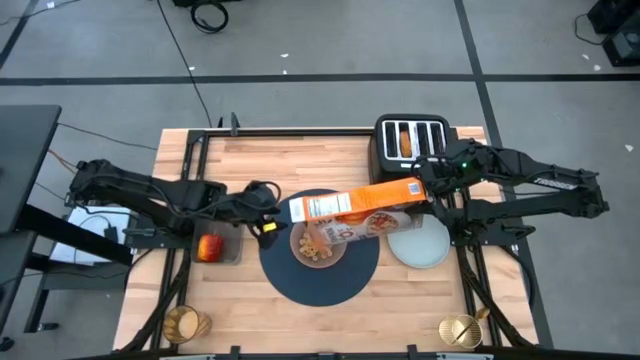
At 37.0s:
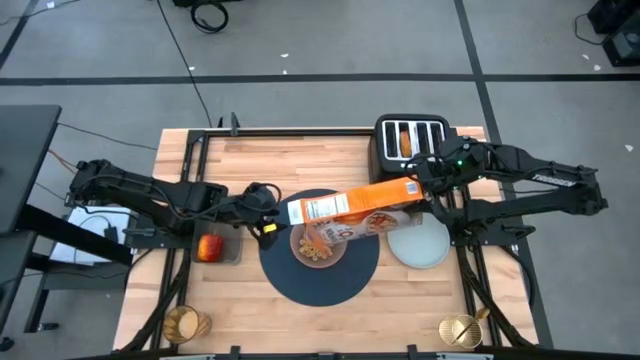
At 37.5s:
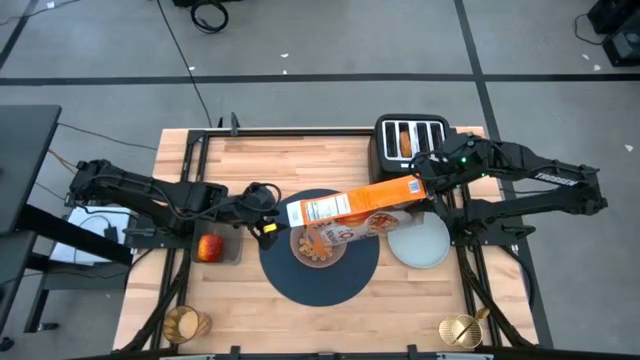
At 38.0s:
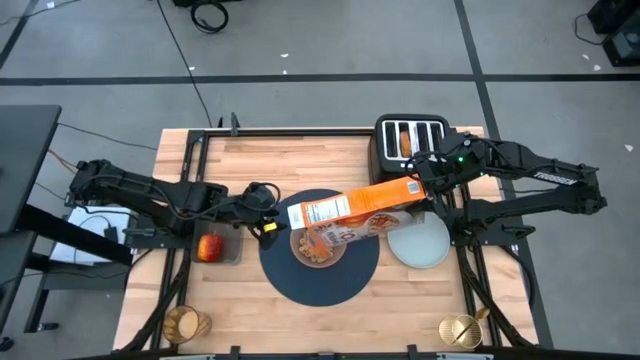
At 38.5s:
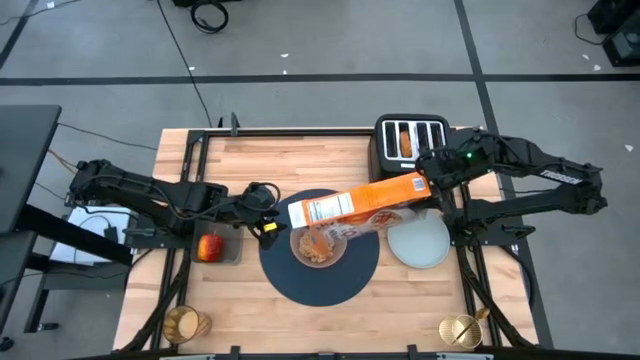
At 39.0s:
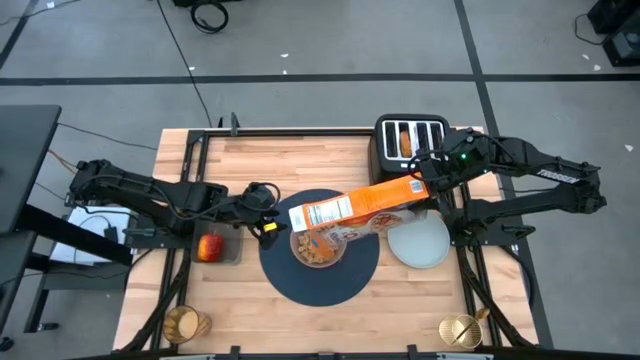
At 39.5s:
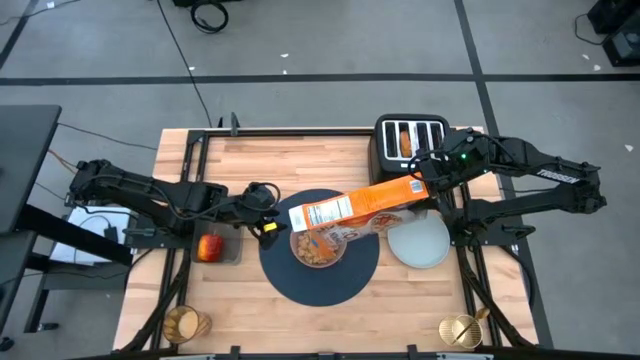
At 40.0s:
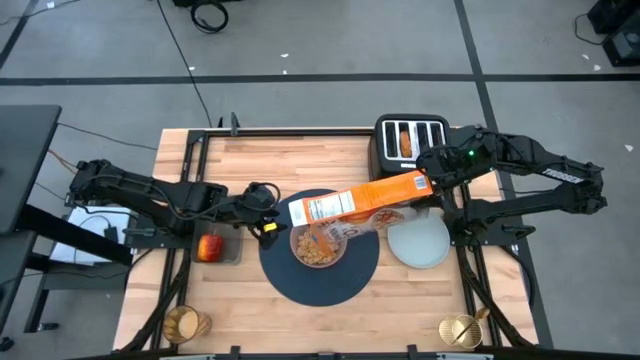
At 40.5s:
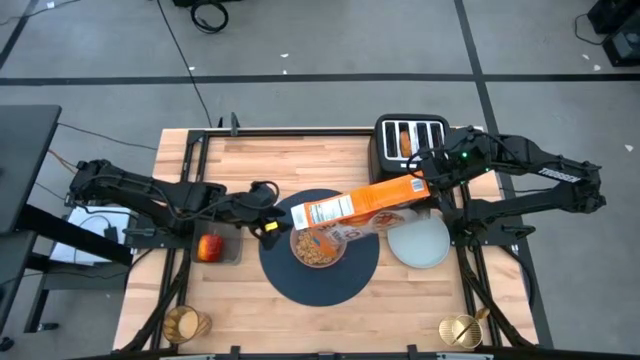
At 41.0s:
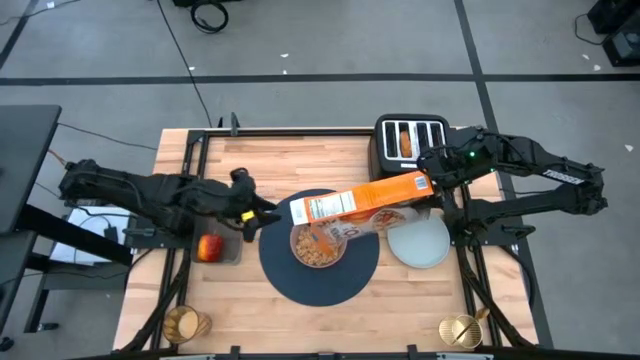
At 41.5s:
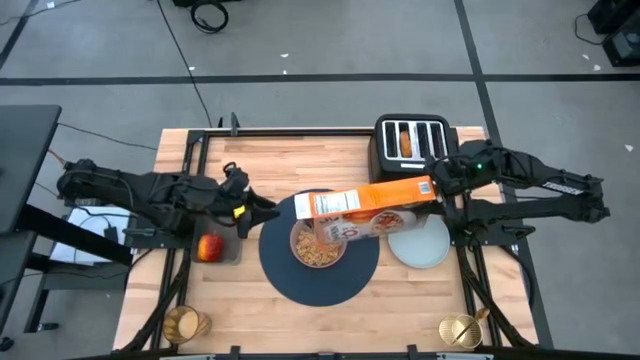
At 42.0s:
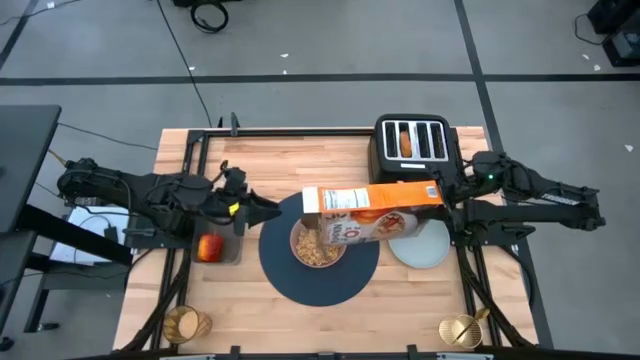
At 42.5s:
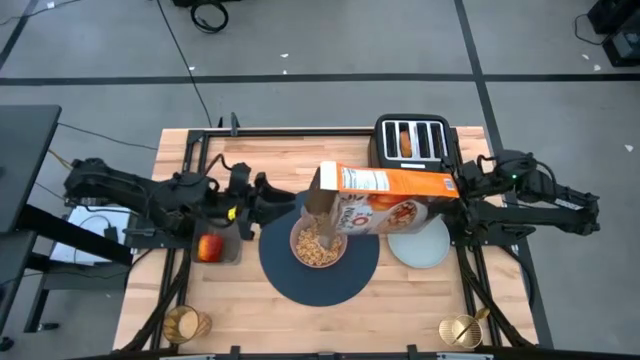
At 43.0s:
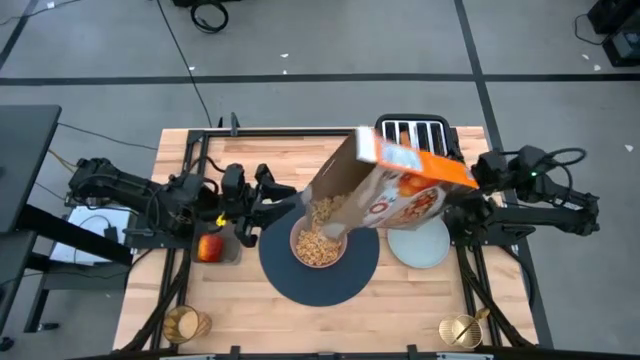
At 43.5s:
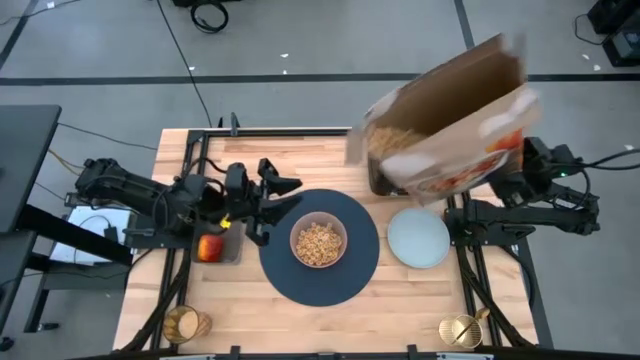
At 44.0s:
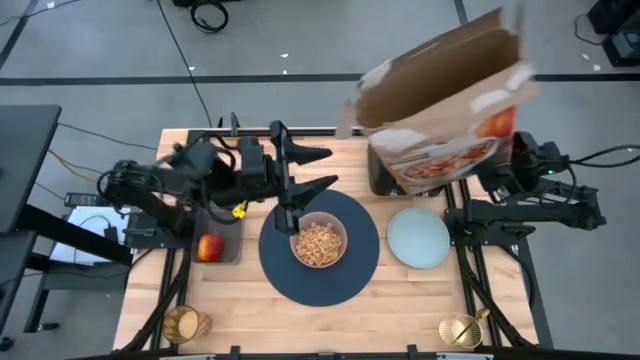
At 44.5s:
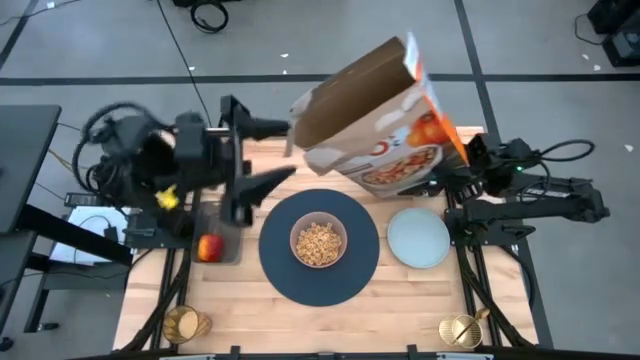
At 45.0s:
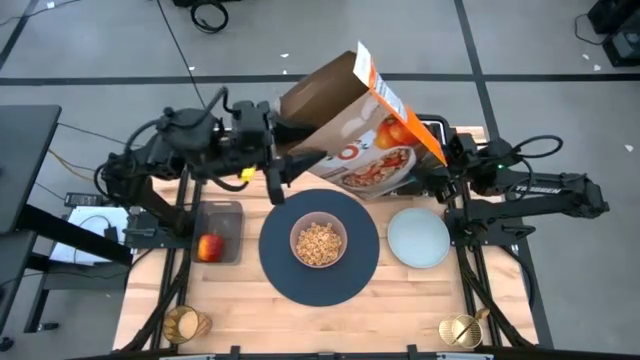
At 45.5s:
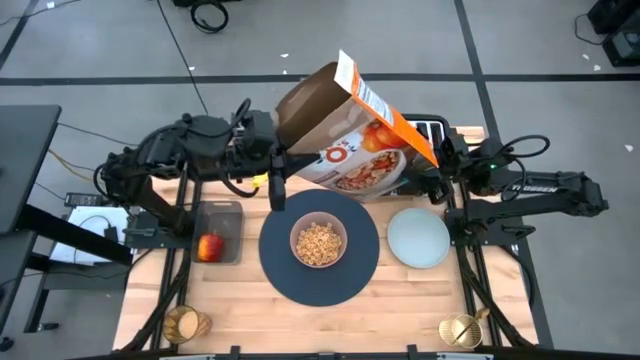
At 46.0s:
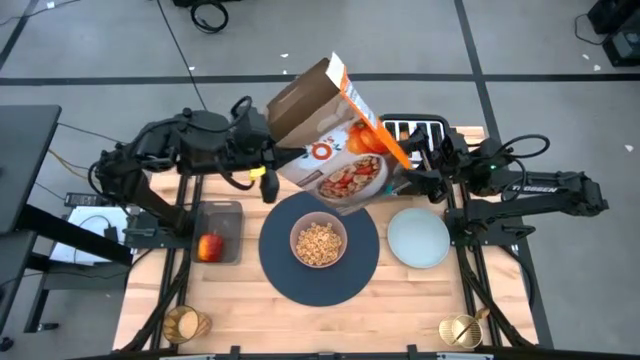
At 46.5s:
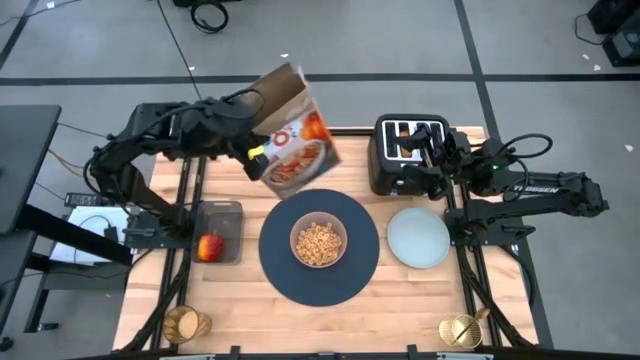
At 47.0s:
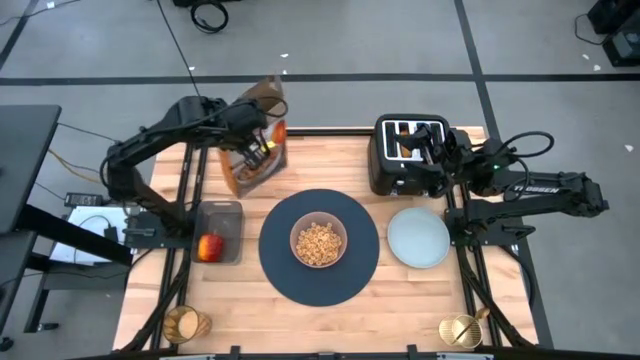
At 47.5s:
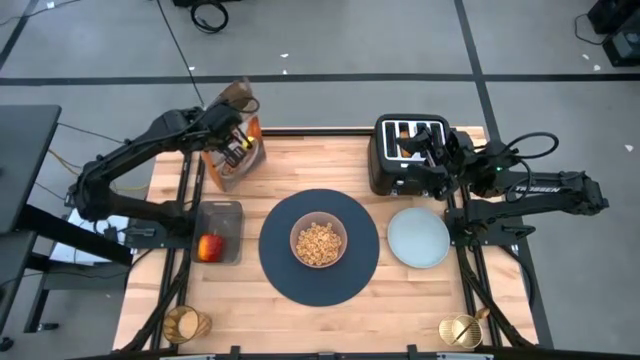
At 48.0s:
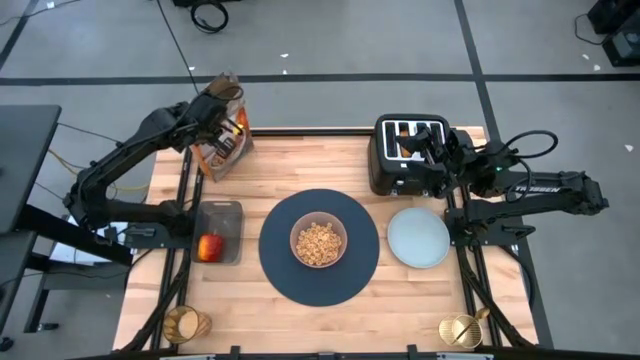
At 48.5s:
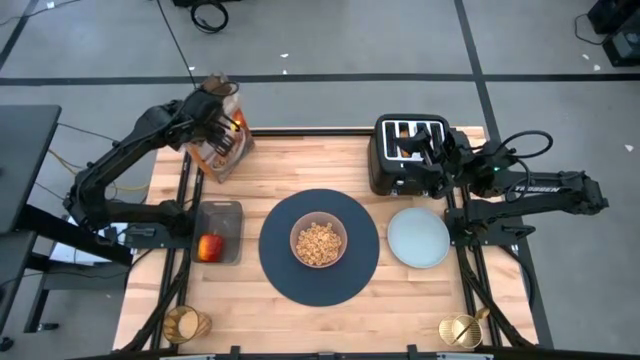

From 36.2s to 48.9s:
Task: Arrange a breakfast setting
Pour the cereal from the orange cereal box into the orange bowl

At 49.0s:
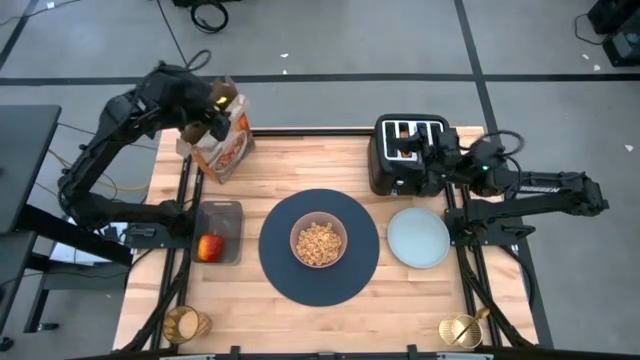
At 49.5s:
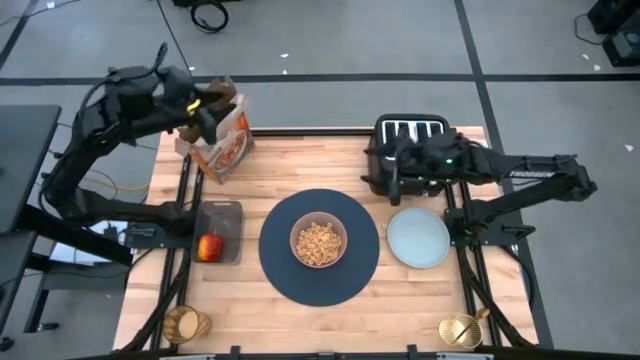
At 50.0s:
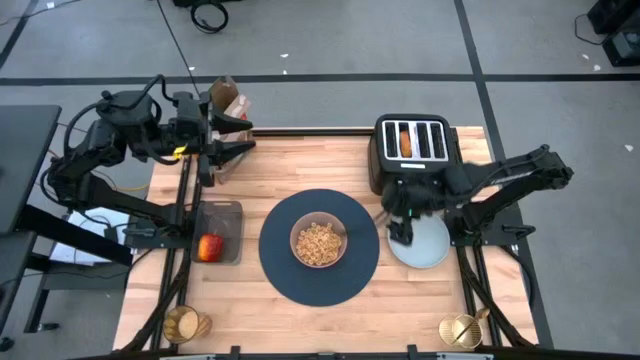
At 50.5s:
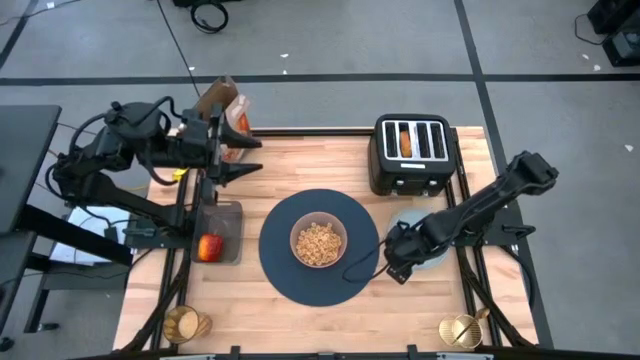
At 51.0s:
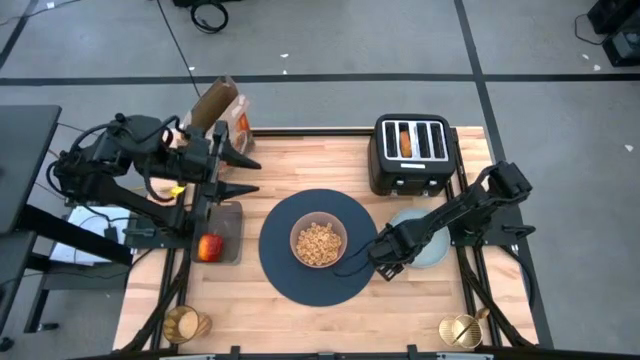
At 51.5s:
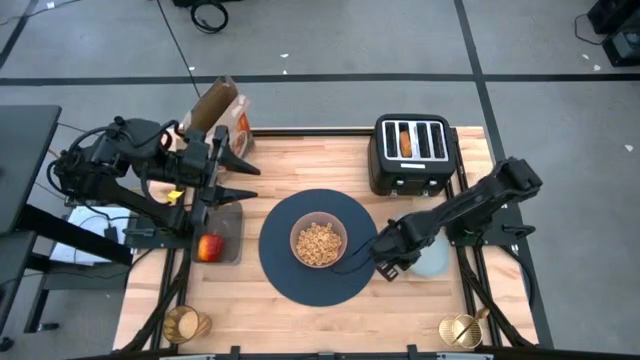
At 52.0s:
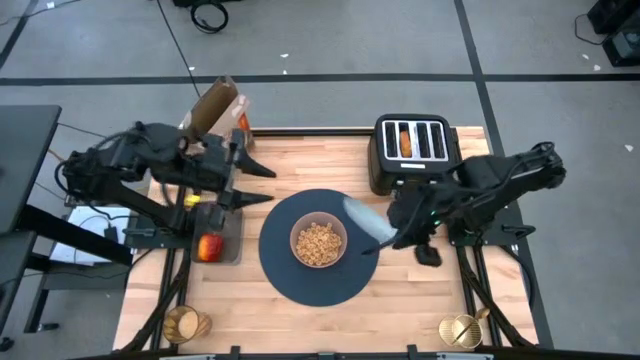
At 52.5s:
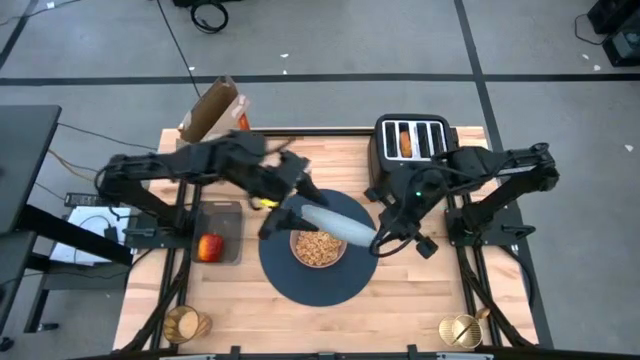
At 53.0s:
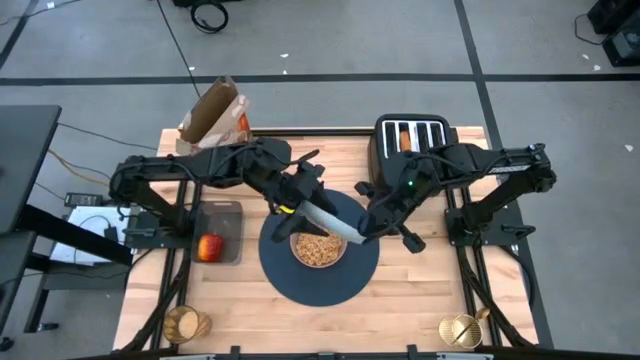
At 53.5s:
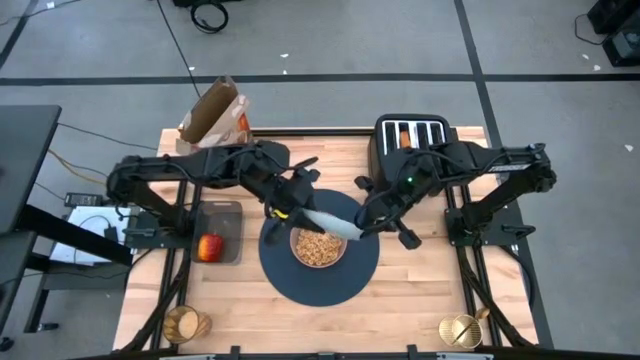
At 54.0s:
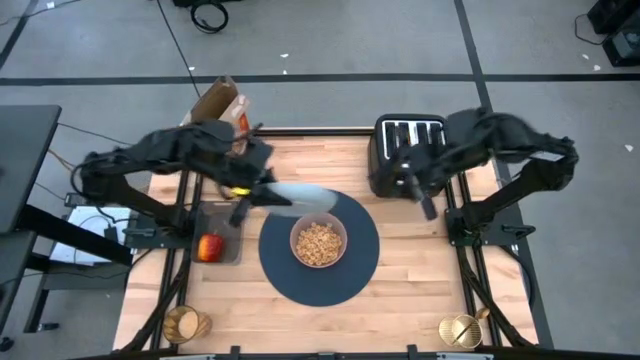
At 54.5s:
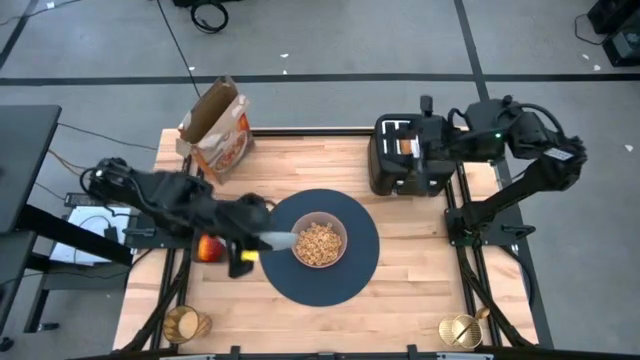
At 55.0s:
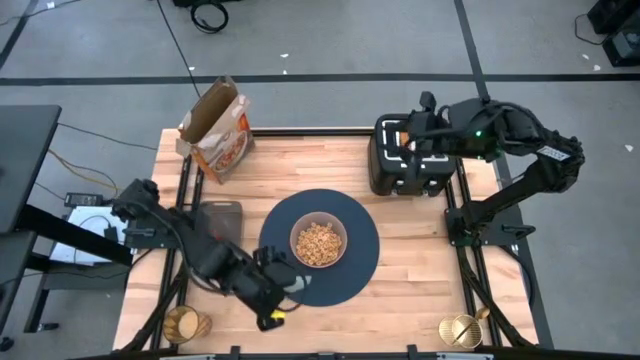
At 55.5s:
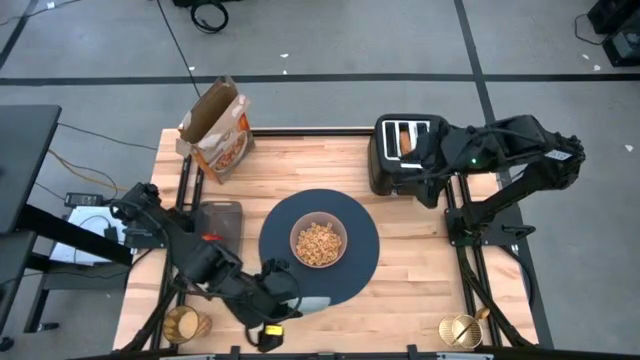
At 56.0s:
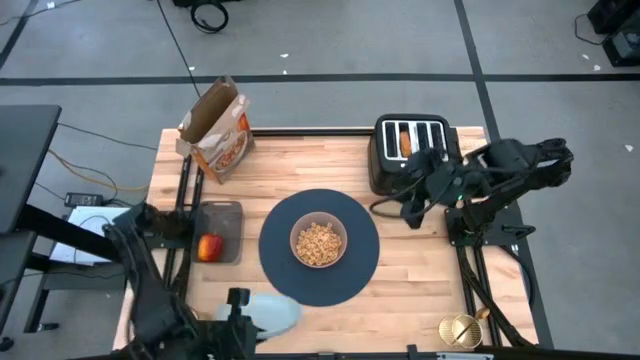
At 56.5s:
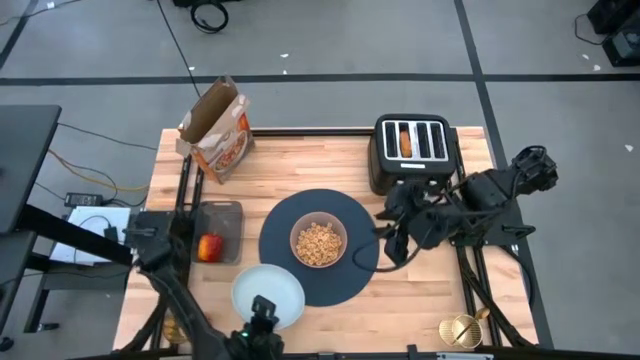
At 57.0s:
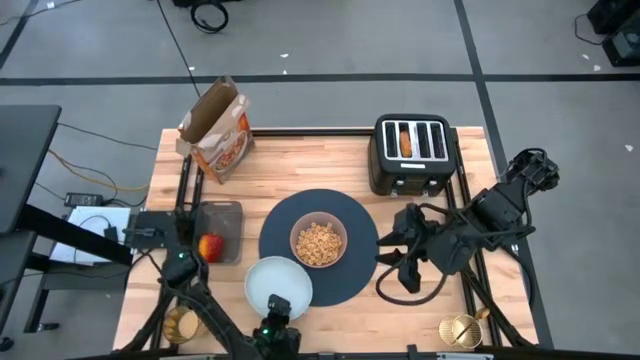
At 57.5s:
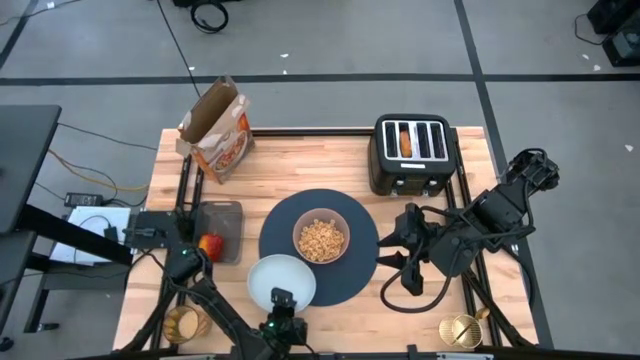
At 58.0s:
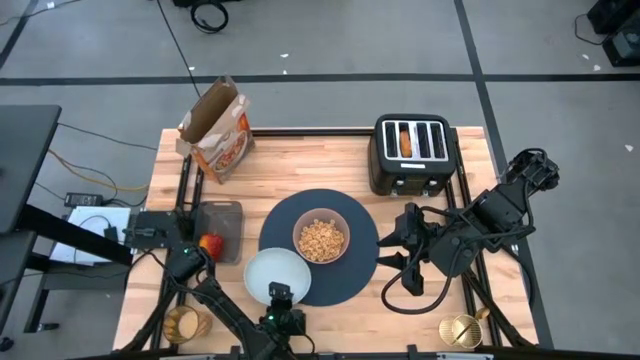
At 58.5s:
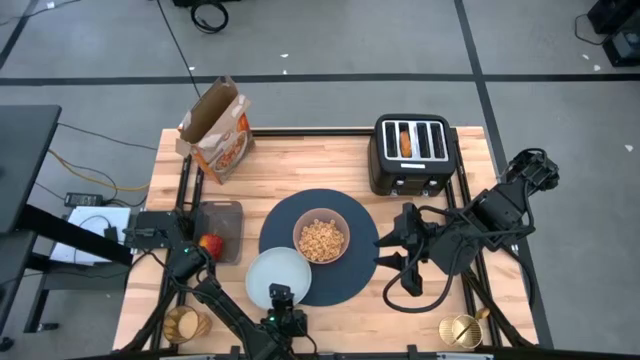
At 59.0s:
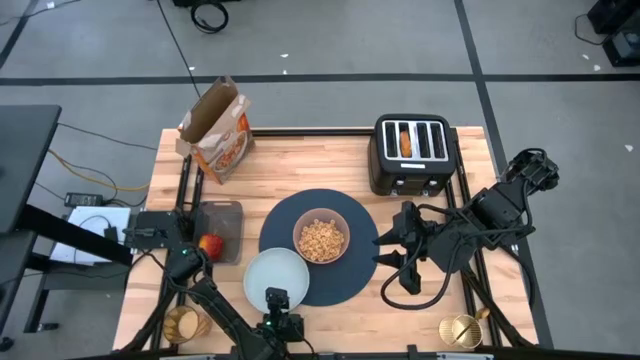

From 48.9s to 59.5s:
Put the blue plate on the bottom left of the orange bowl on the blue placemat

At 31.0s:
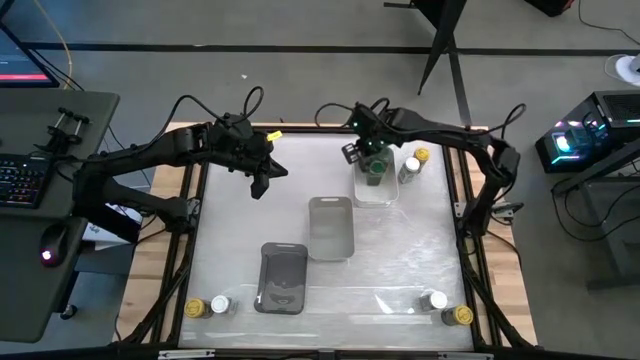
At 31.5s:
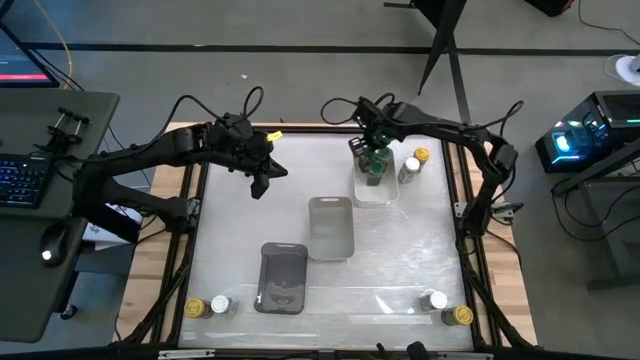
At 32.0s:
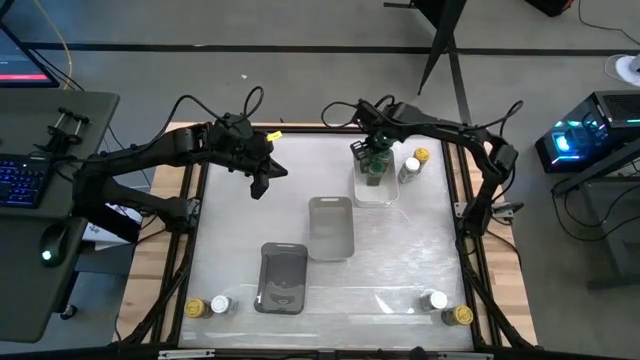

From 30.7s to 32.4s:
Task: Sort spices by type
Adjust the green seasoning bottle in the white bin
